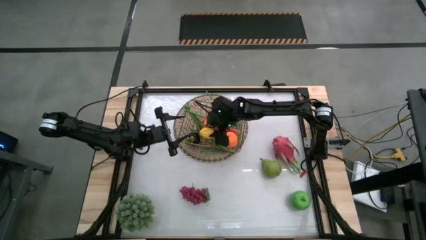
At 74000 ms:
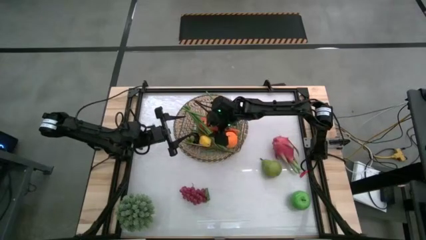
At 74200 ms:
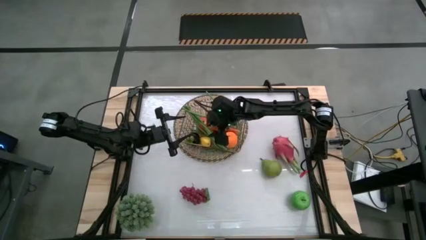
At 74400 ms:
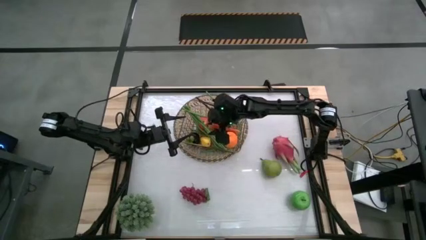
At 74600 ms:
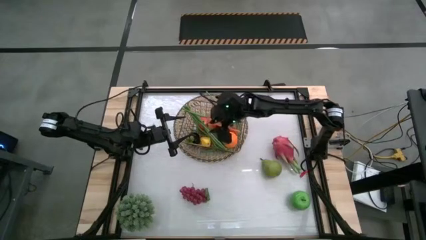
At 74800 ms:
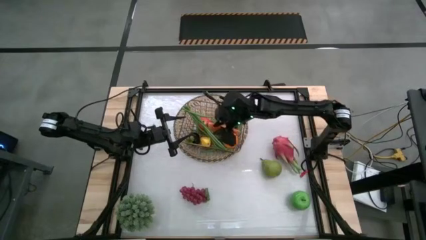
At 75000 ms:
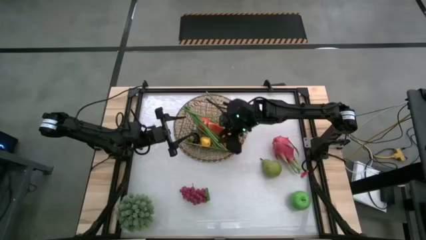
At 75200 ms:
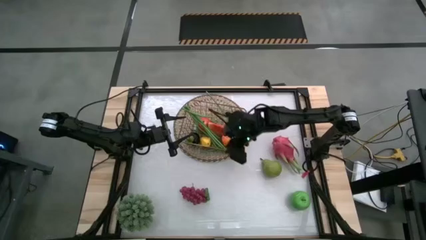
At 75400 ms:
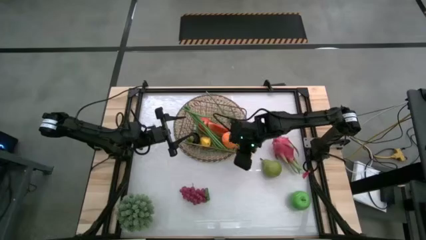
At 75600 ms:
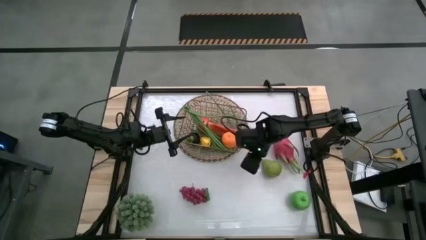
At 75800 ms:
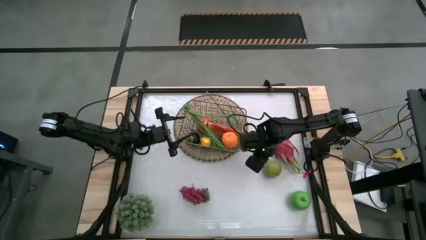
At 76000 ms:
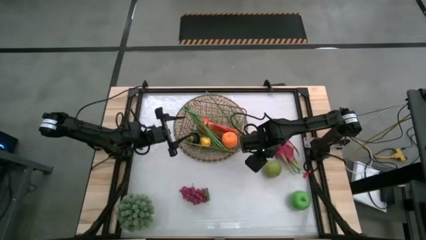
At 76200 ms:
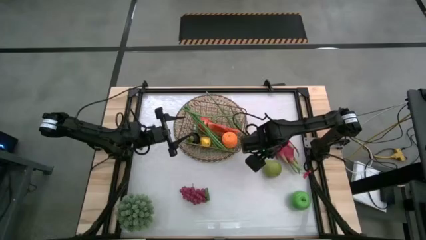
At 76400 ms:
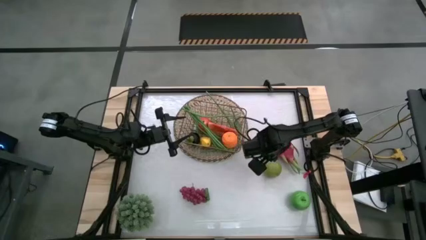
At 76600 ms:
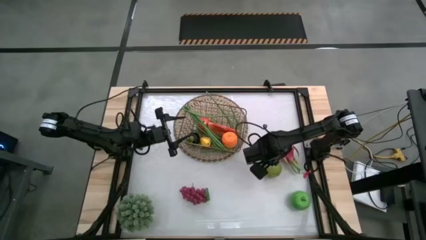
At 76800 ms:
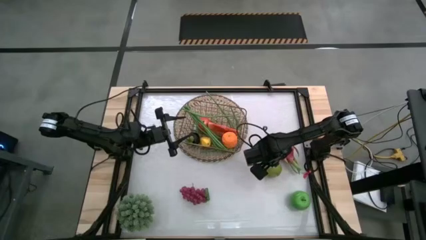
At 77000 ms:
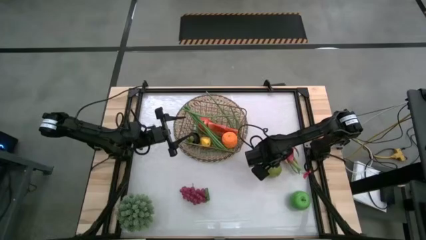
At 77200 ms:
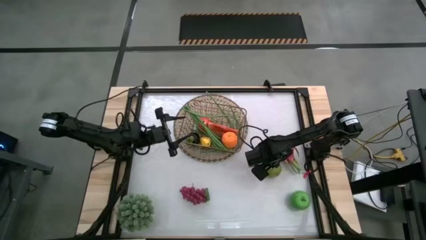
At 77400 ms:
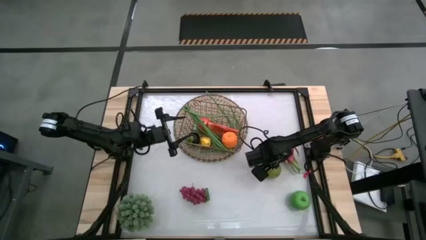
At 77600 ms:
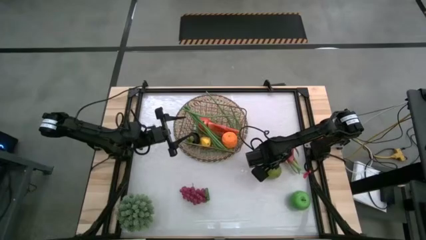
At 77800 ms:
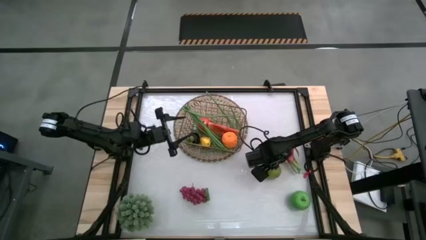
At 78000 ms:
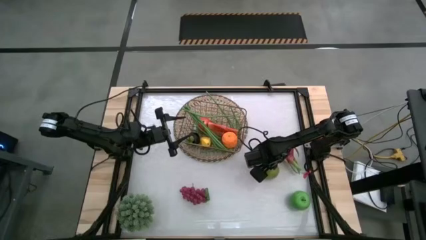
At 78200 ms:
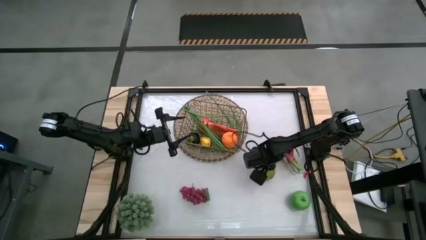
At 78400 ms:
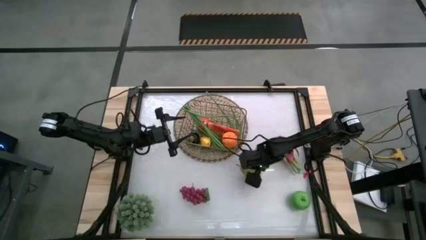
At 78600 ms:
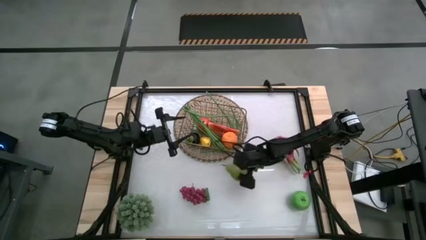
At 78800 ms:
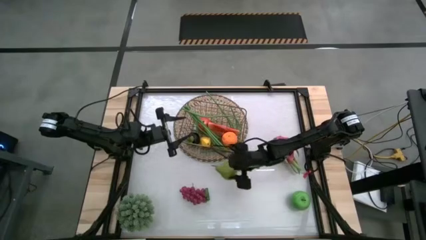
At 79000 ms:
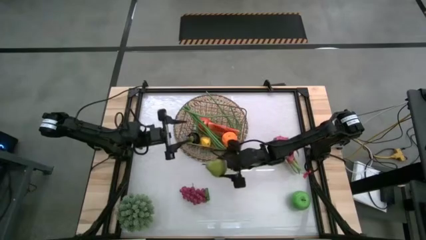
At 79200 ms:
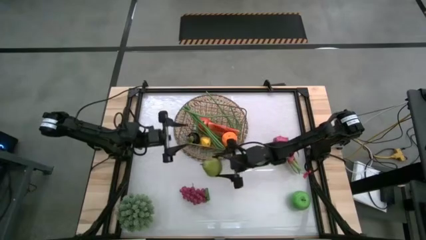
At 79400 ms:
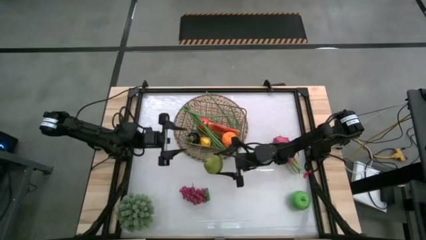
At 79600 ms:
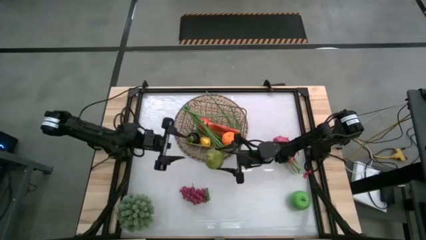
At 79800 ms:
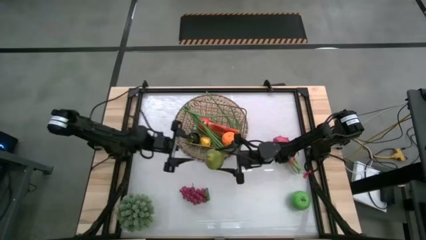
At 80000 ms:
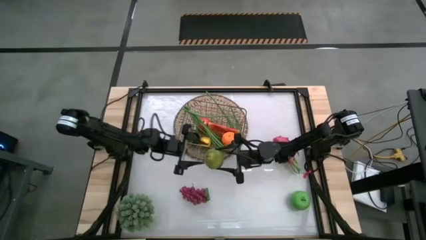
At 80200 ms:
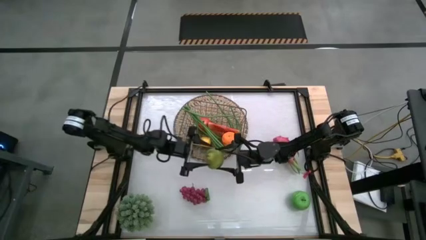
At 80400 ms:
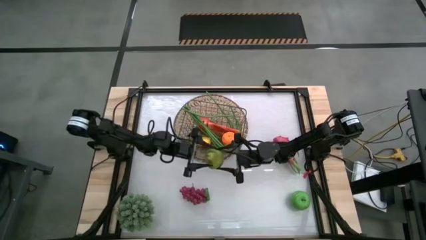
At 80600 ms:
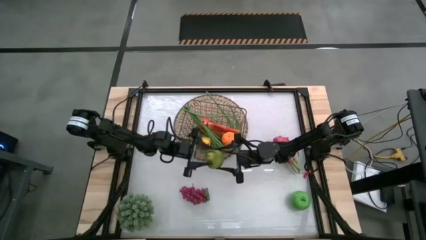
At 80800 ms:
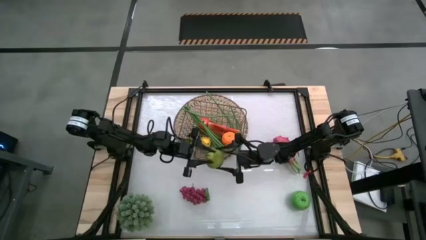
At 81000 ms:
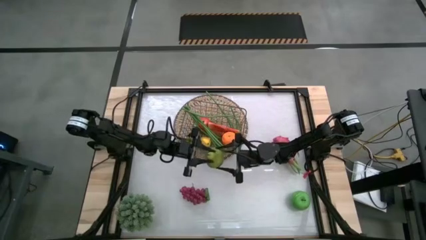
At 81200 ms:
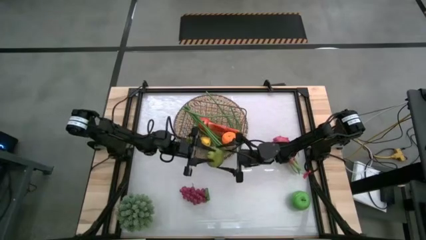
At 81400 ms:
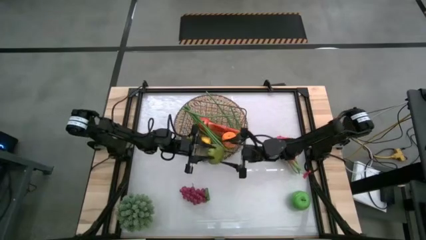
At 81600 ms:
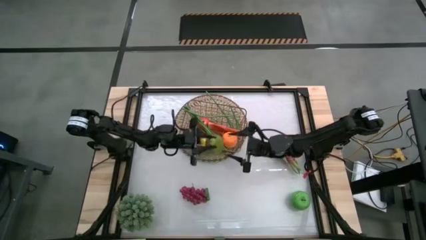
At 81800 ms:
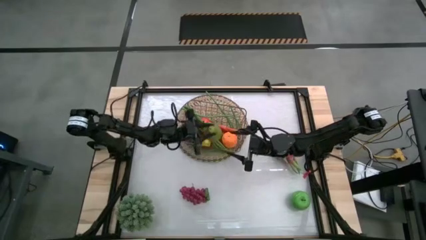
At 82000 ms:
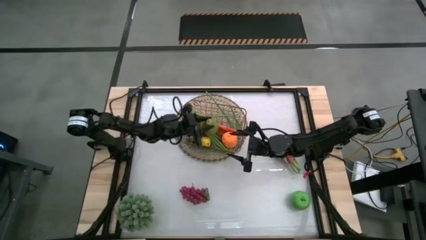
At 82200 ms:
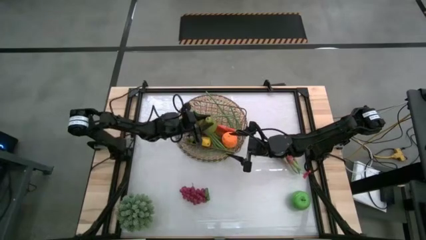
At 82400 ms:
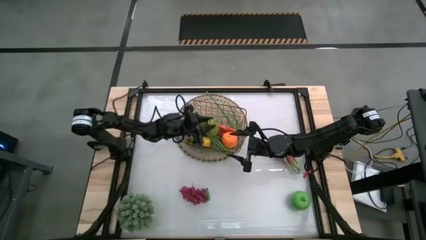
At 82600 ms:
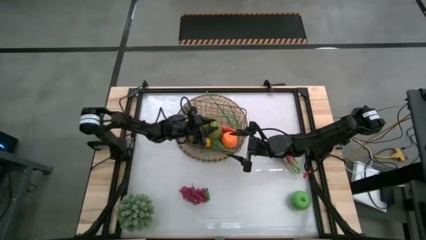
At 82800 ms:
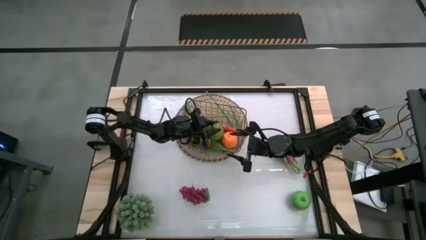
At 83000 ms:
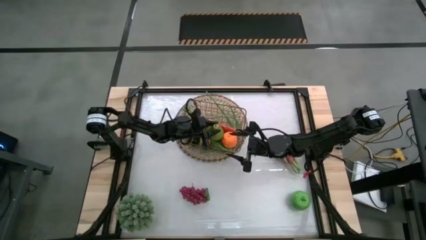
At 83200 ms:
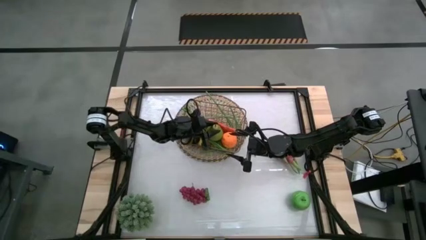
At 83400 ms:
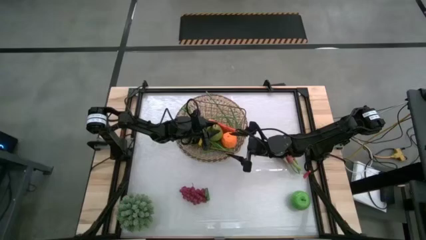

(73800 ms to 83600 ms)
Task: Build produce basket
Put the pear into the wire basket

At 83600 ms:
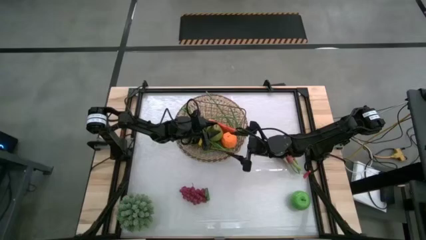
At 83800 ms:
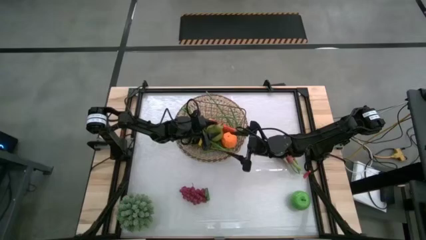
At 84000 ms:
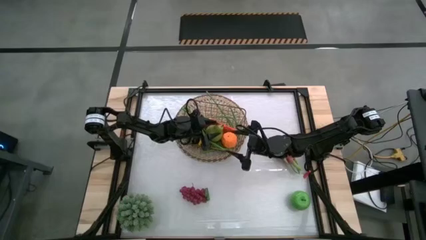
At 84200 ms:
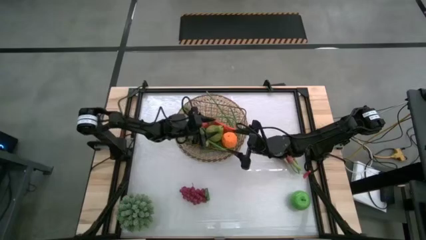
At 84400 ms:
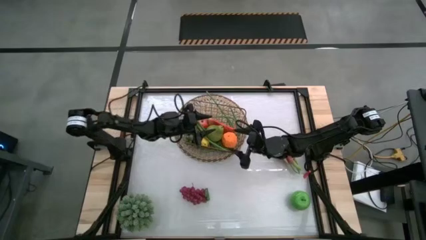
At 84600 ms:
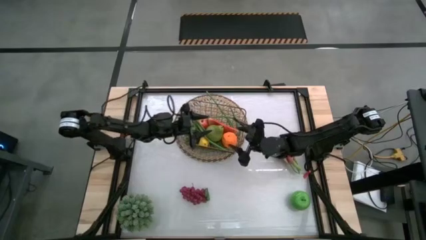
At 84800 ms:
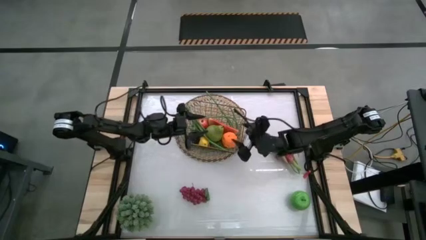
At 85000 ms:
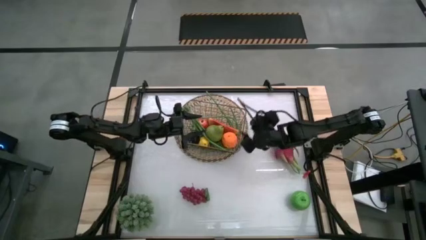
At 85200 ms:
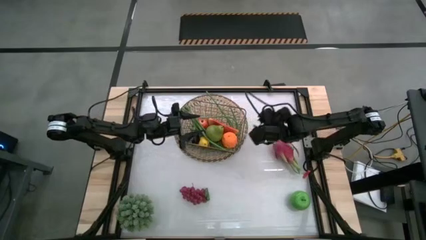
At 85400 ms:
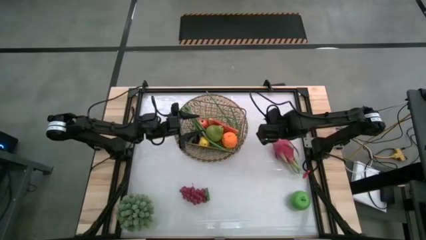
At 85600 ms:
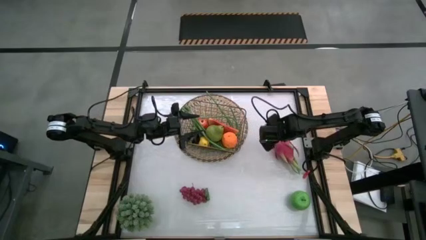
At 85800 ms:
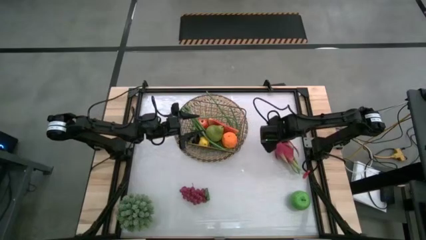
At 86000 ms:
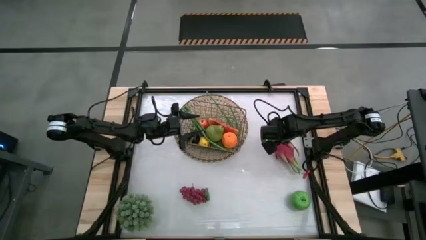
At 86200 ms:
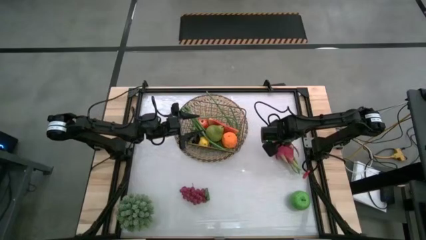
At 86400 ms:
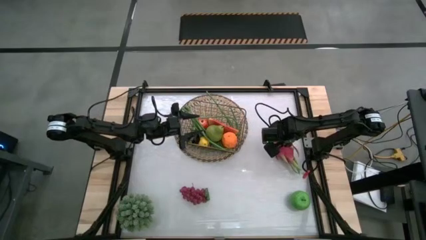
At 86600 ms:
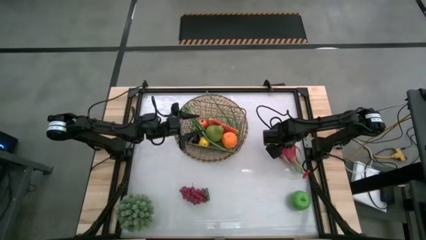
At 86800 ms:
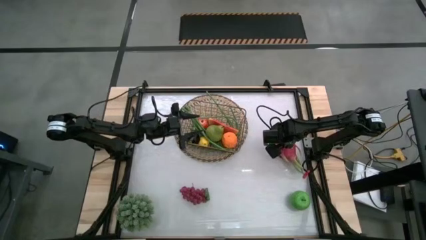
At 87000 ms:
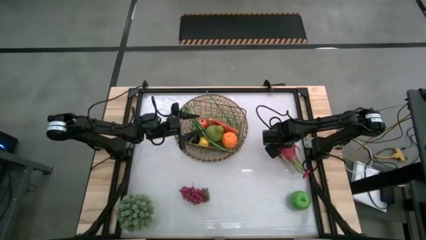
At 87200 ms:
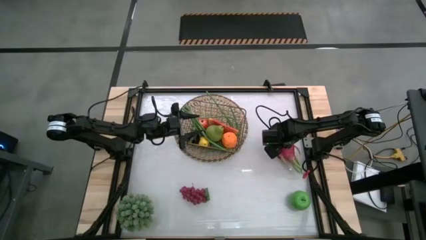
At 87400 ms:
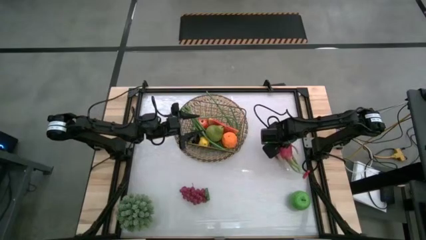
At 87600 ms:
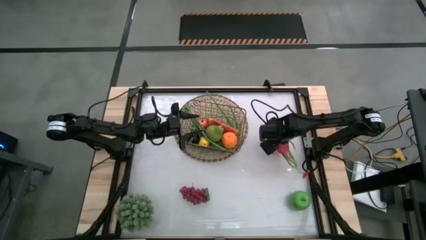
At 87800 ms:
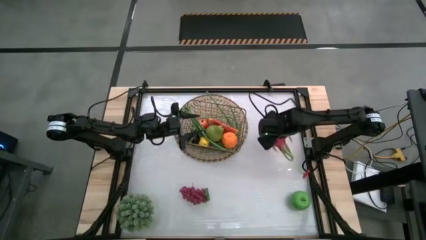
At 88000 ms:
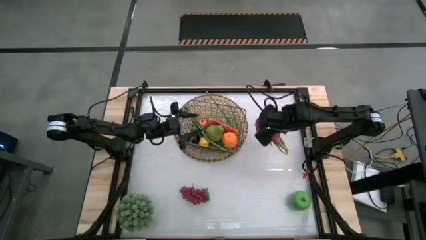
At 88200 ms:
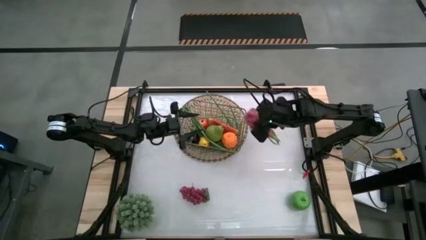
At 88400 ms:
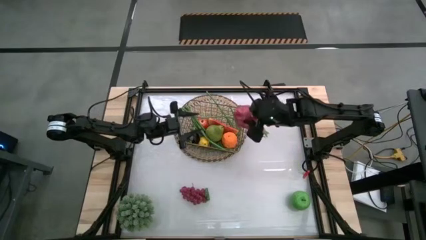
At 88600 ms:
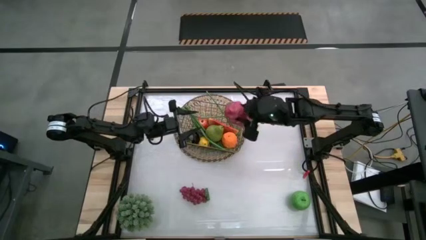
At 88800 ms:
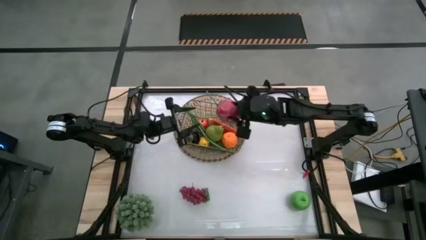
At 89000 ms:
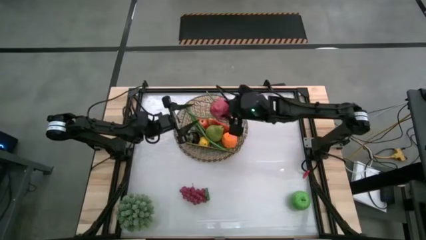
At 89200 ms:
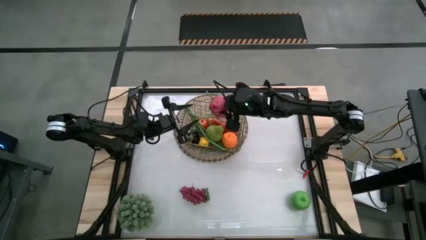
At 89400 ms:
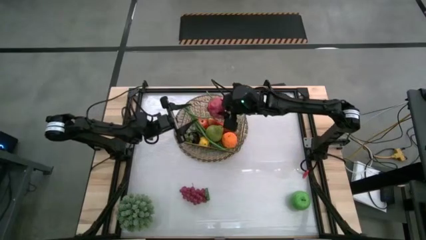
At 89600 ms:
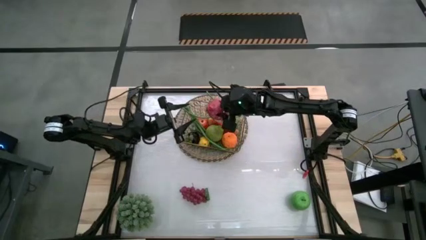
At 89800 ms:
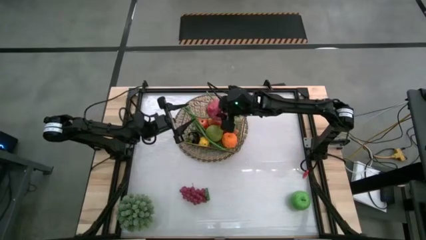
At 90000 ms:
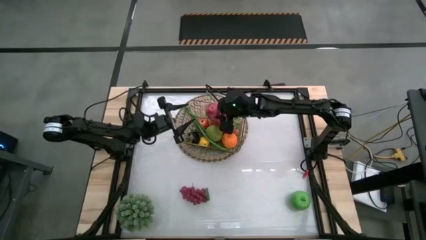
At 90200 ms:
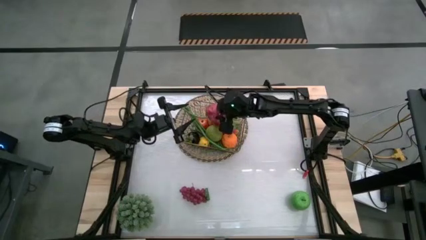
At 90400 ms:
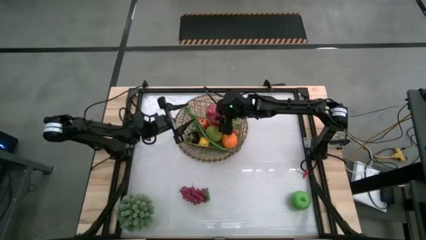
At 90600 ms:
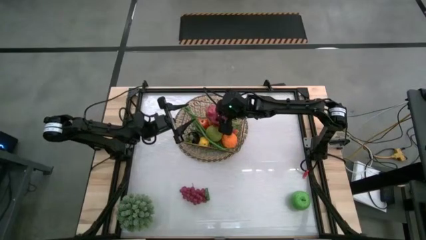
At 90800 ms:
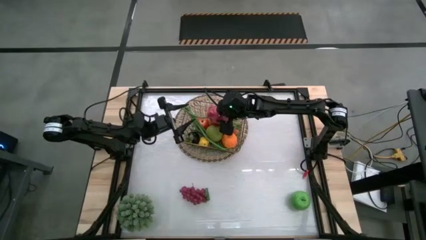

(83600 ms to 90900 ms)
Put the dragon fruit into the wire basket
